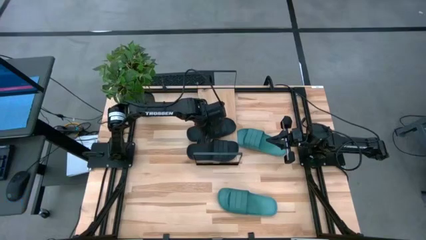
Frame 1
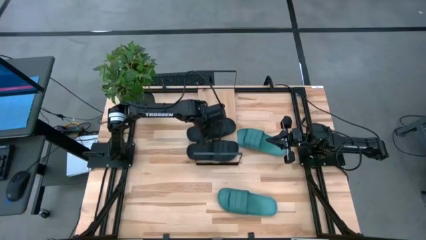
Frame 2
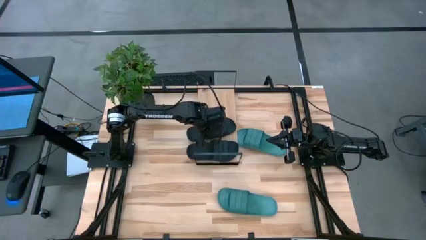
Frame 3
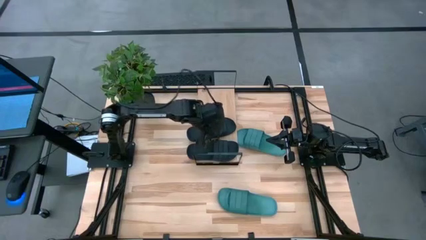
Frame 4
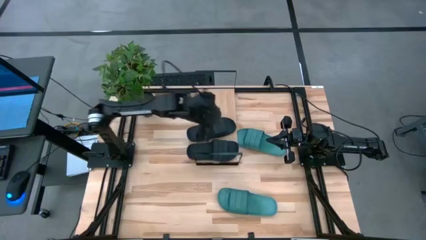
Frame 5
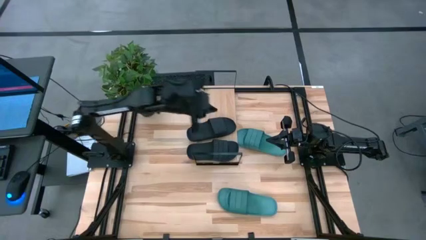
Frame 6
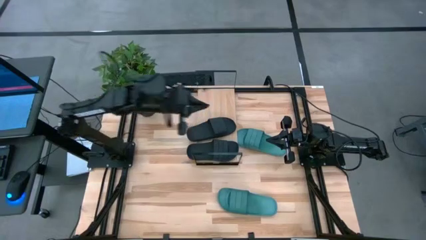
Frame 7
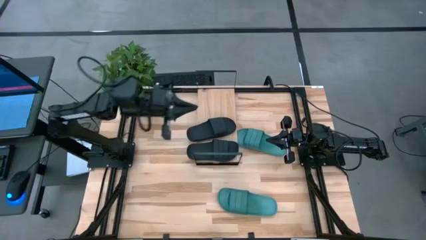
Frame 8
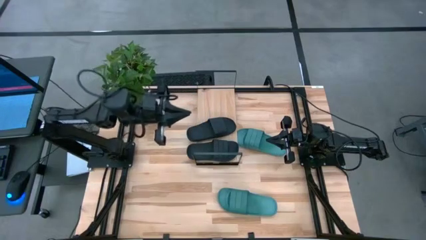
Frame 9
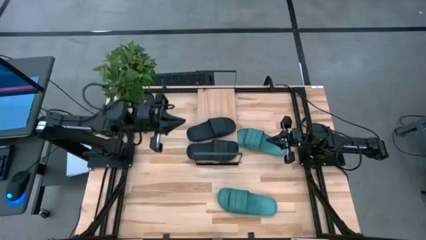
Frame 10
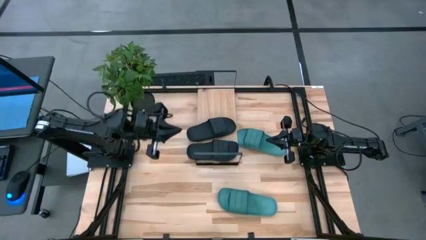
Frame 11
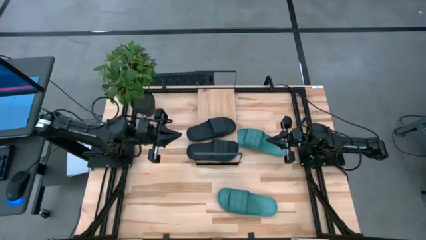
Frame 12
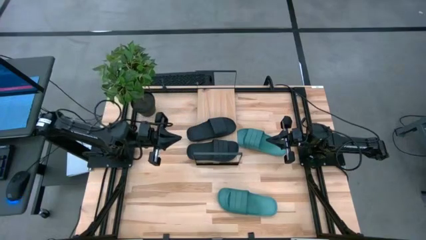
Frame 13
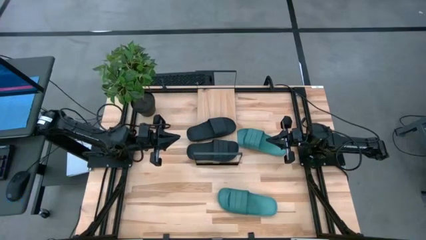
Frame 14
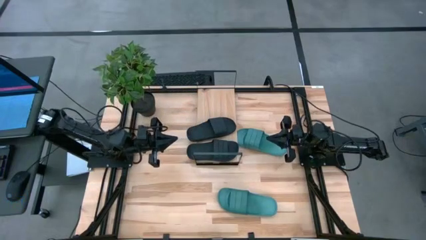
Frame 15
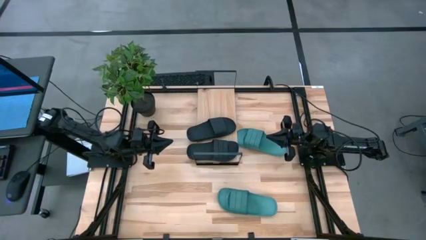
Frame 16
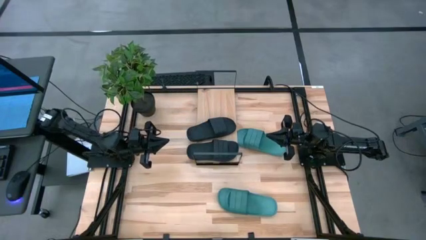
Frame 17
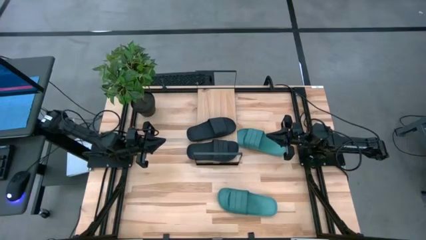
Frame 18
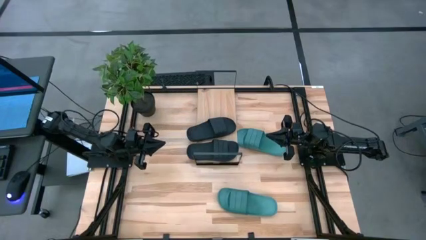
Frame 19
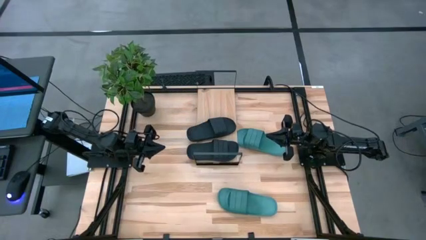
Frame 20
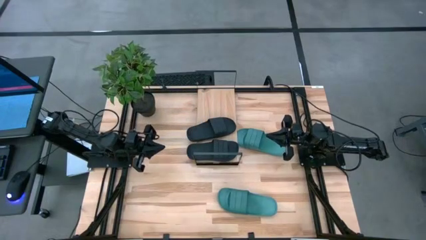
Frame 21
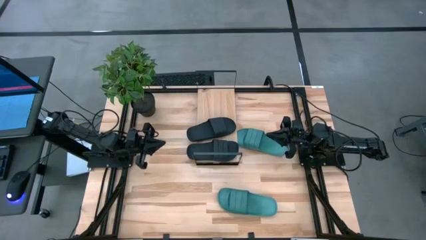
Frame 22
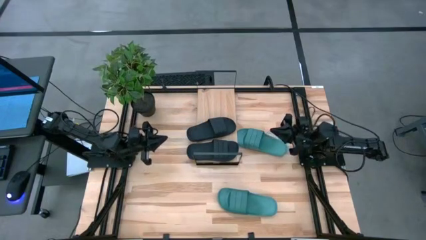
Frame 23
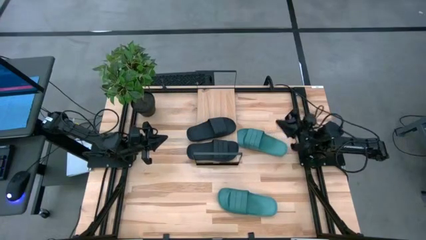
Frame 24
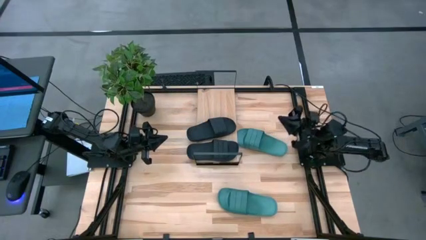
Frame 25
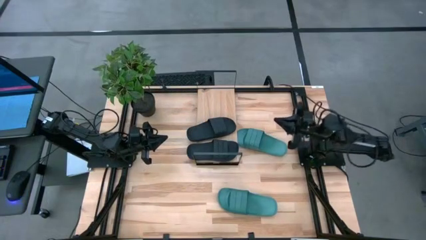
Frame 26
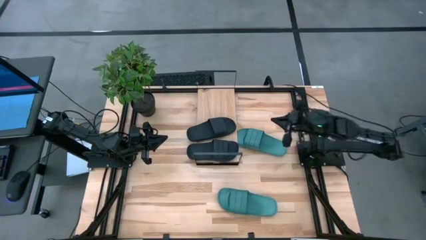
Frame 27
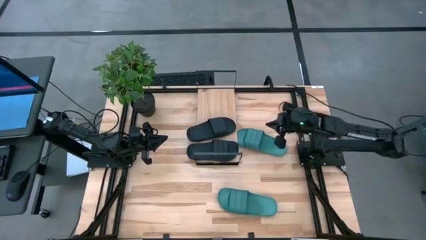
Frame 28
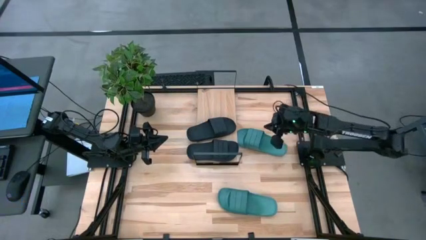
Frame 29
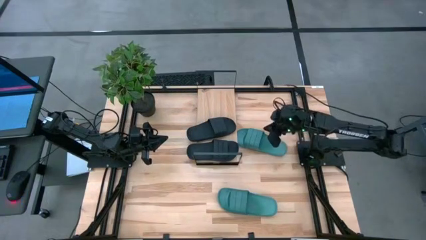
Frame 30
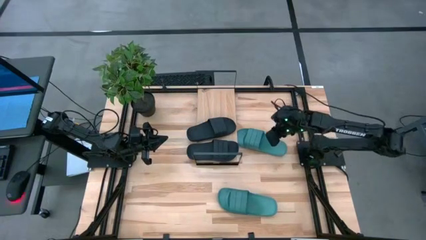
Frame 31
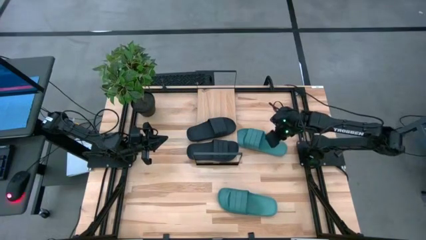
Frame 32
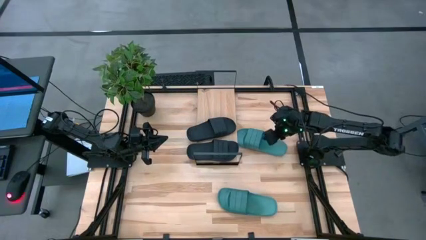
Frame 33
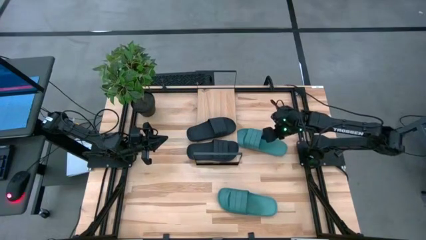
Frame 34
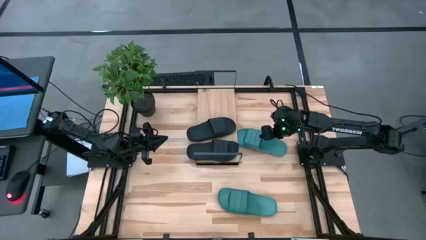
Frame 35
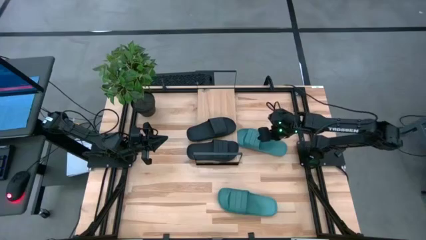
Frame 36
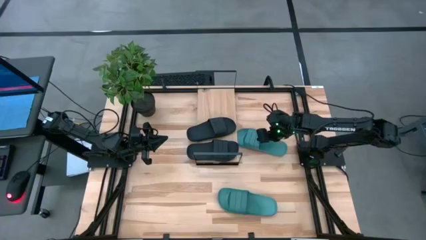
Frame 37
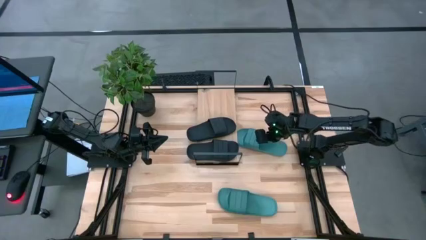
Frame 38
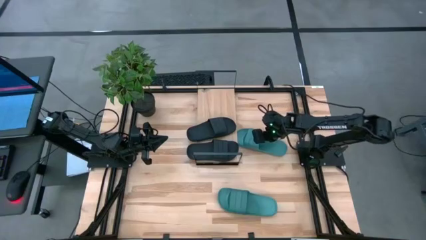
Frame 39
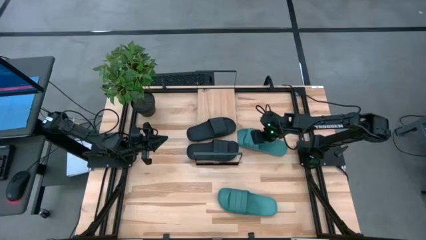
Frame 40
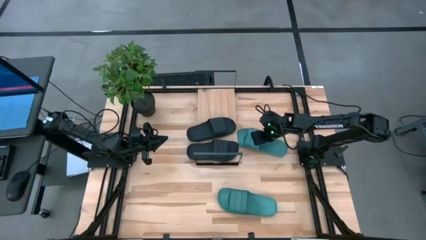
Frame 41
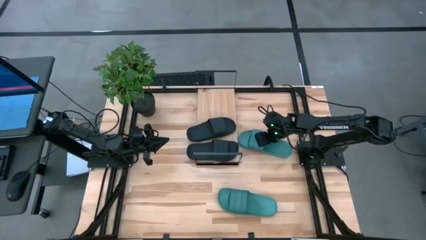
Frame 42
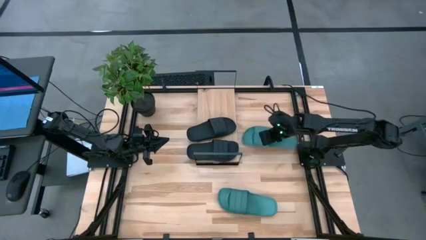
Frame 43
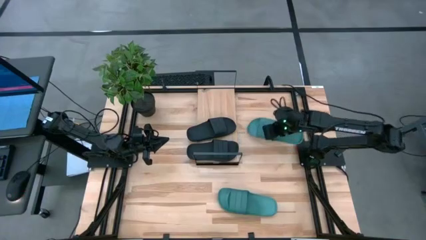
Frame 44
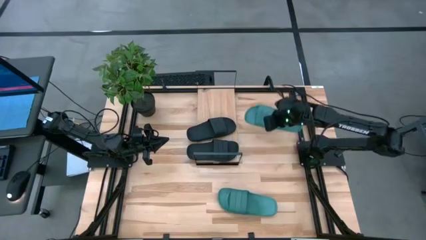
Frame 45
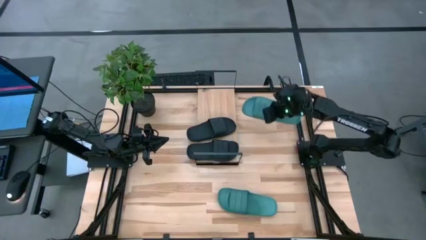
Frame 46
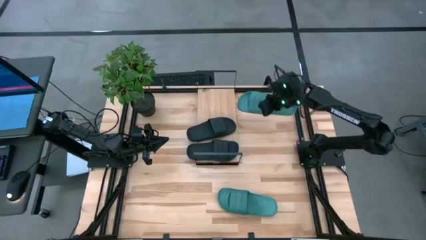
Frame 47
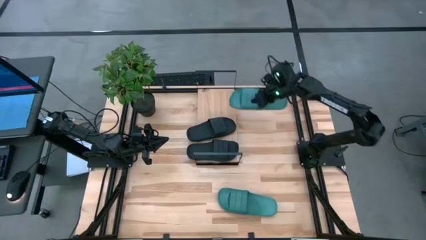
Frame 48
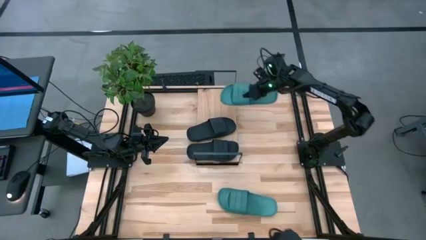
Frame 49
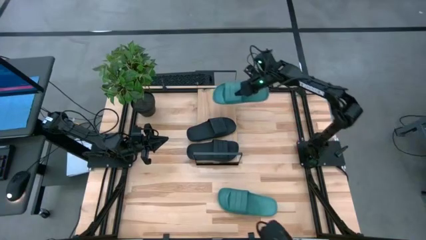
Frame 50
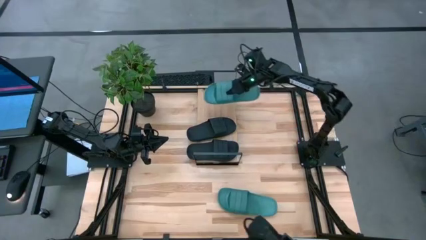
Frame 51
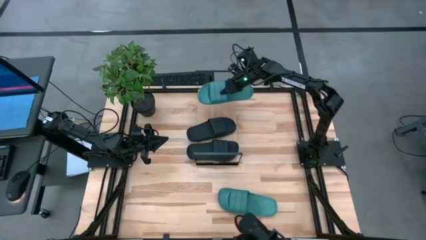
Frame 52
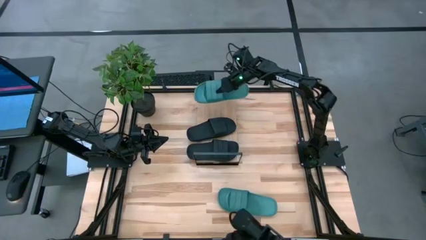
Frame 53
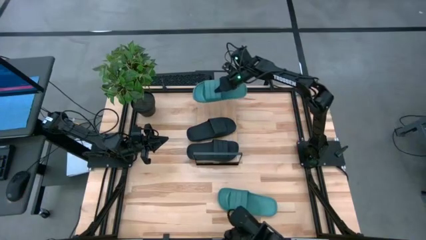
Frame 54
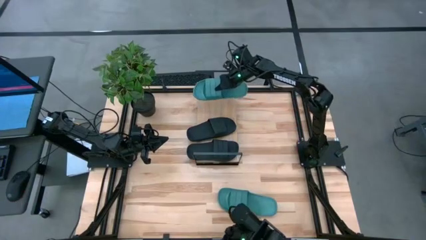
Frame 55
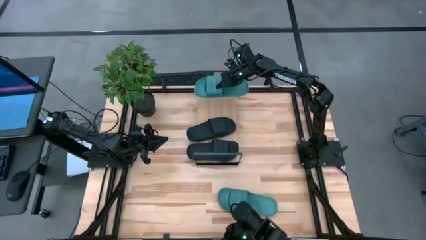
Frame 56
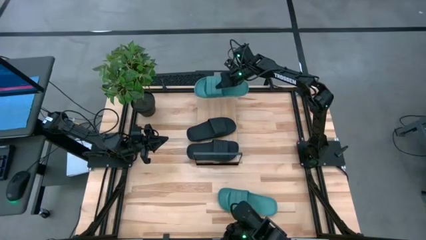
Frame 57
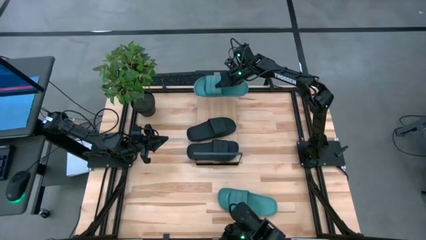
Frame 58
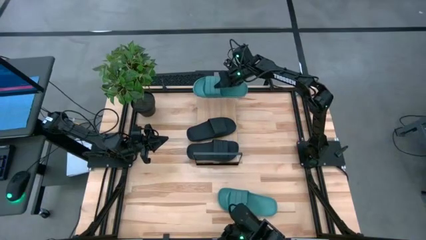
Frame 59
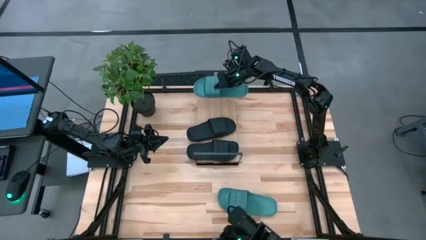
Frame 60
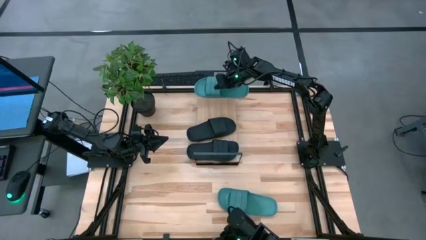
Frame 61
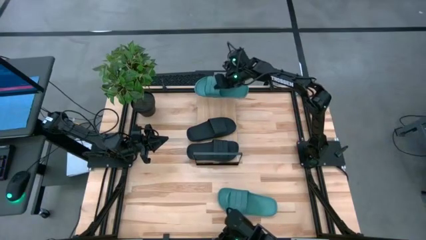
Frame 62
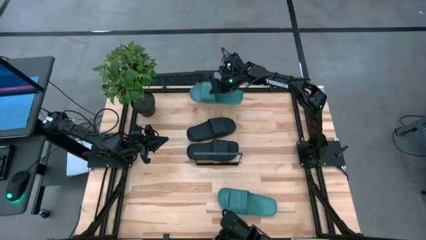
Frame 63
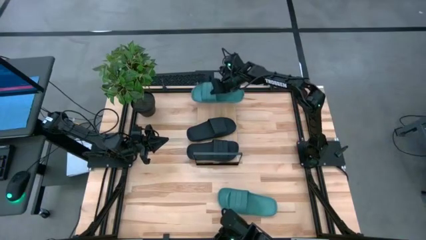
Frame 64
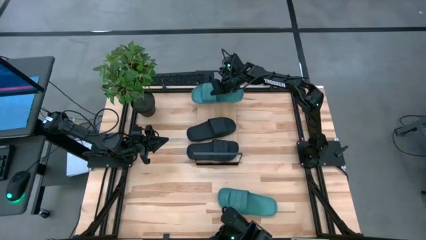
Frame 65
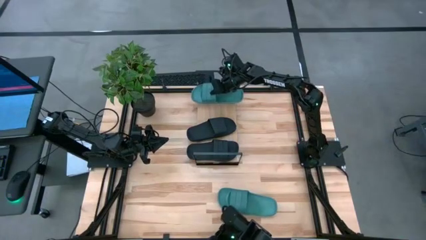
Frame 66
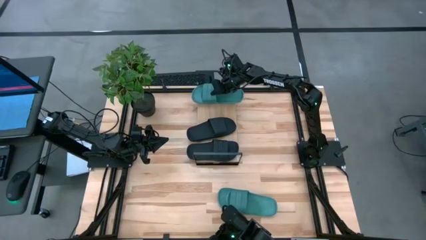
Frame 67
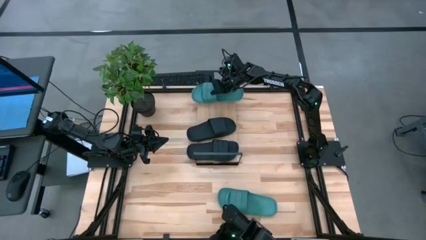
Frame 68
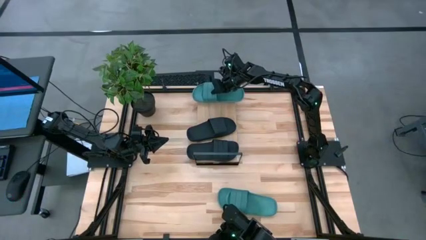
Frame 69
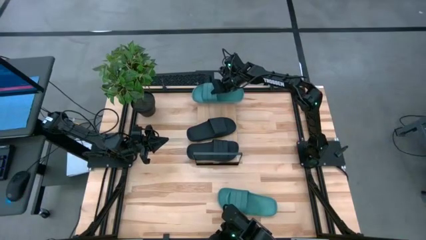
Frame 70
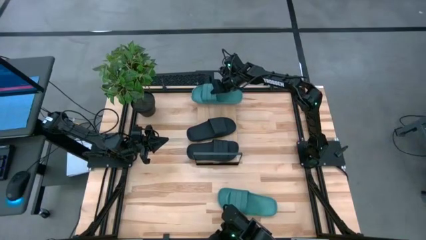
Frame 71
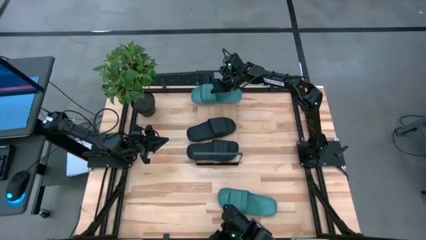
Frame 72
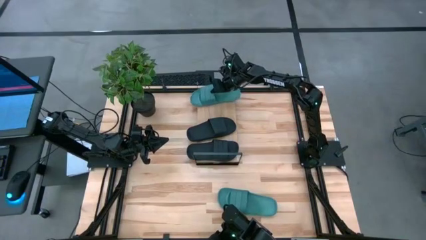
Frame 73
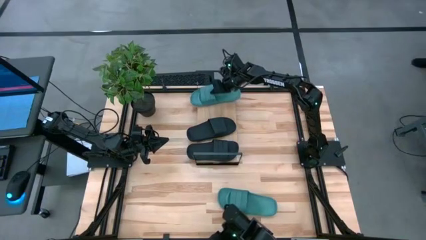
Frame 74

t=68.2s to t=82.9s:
Task: Pick and place slides into the shelf
Put the top green slide on the shelf

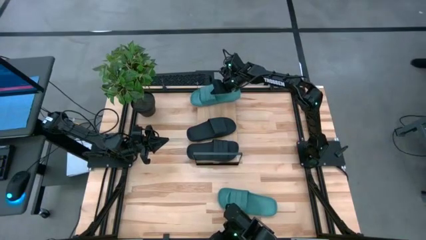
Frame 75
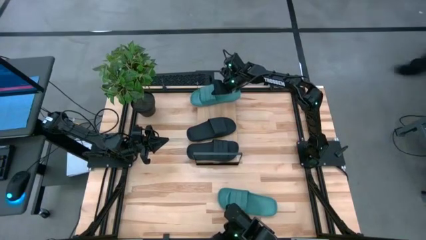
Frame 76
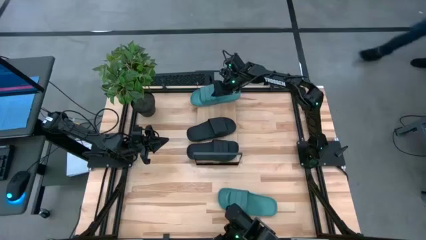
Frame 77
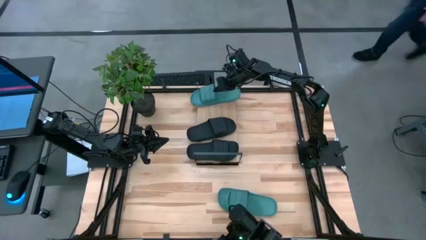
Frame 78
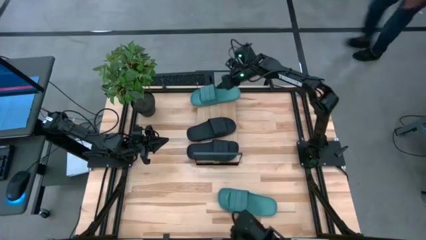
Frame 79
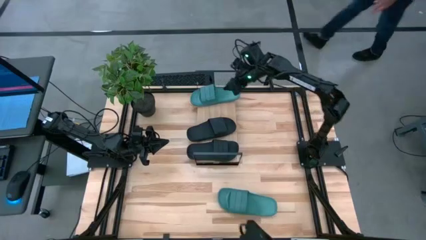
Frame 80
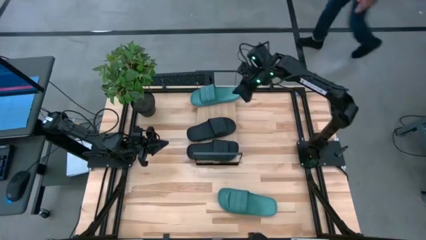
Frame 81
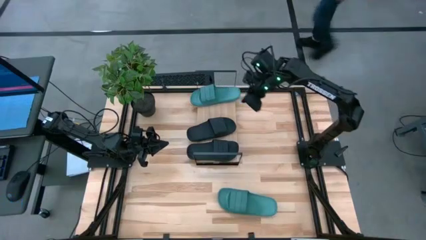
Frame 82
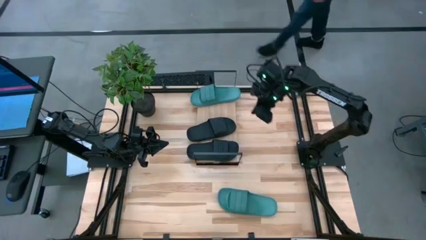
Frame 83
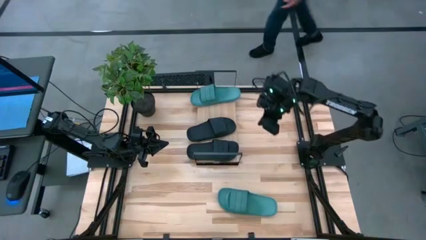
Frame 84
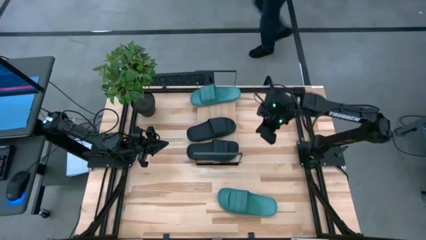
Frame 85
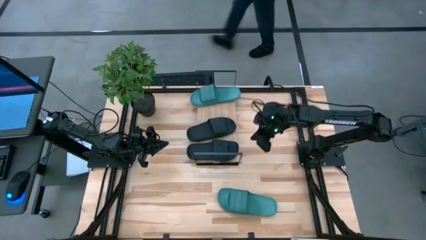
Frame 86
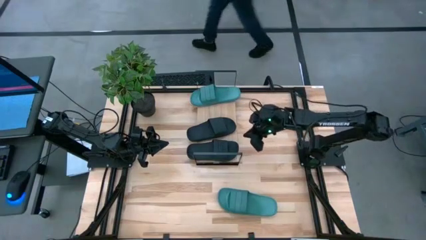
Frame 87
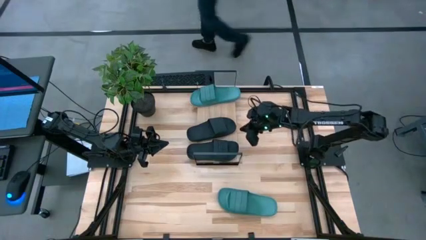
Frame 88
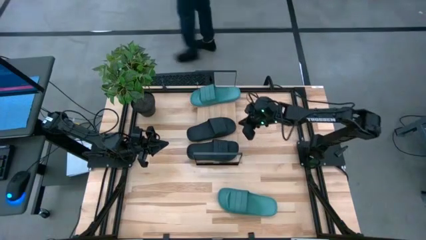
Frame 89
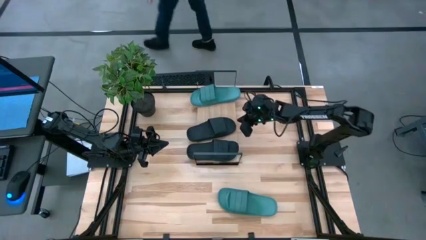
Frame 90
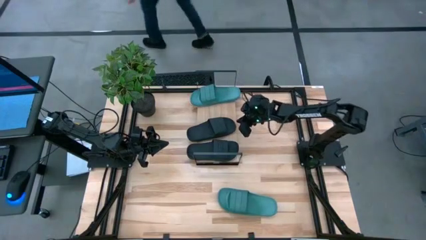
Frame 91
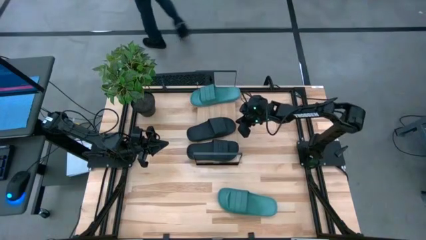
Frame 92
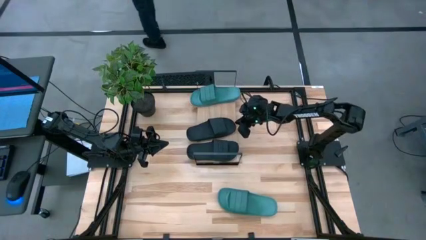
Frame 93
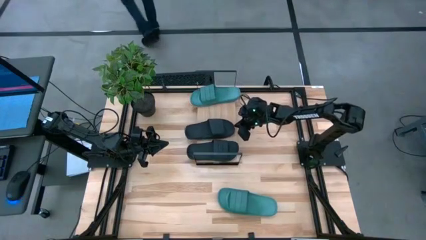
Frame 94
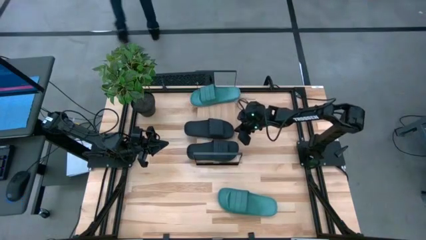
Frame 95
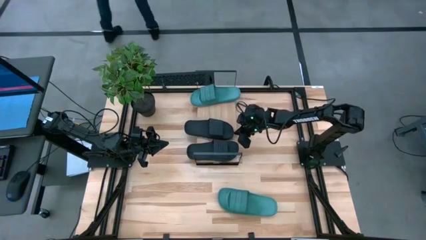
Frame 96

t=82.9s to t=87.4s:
Adjust the top black slide on the shelf
